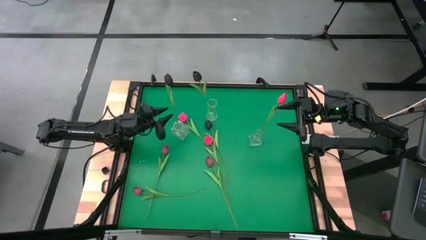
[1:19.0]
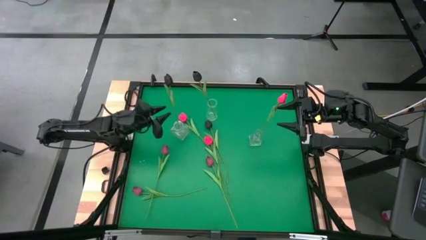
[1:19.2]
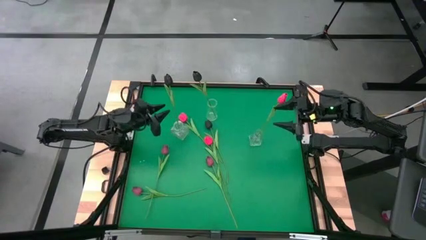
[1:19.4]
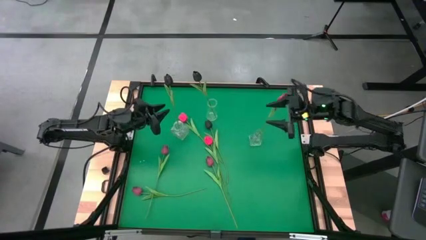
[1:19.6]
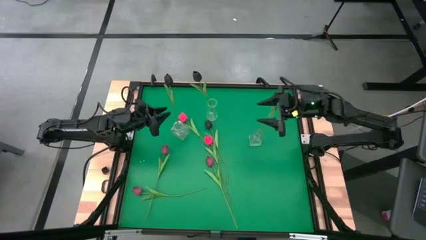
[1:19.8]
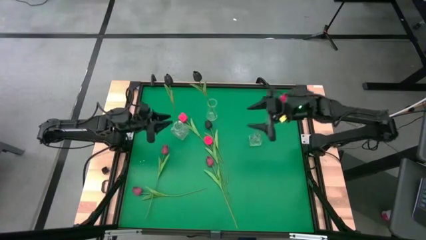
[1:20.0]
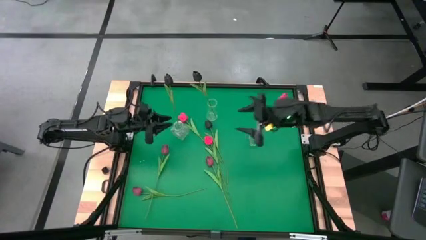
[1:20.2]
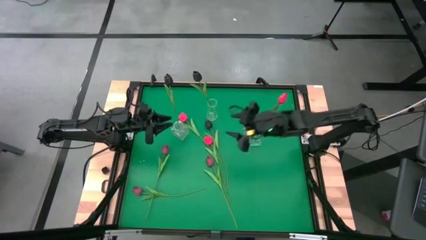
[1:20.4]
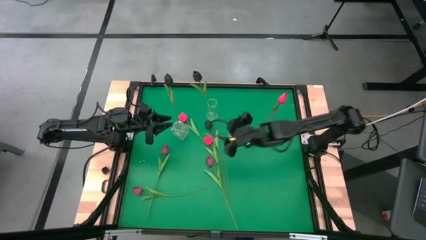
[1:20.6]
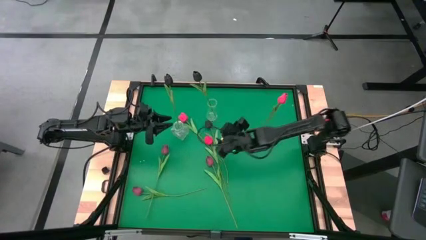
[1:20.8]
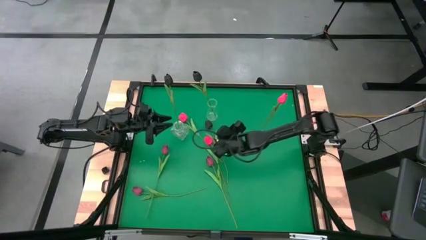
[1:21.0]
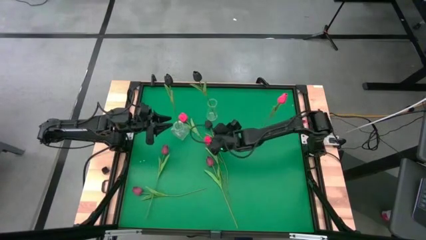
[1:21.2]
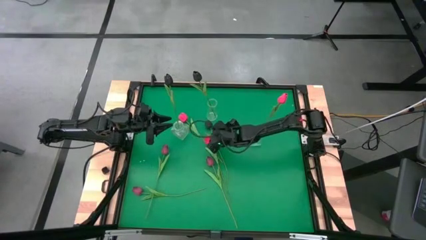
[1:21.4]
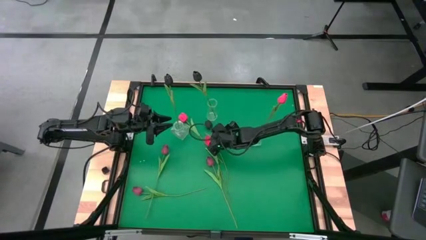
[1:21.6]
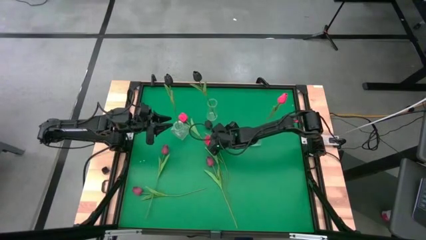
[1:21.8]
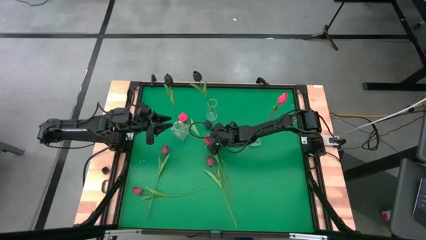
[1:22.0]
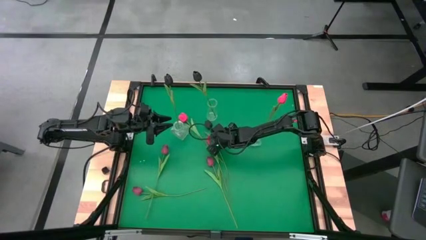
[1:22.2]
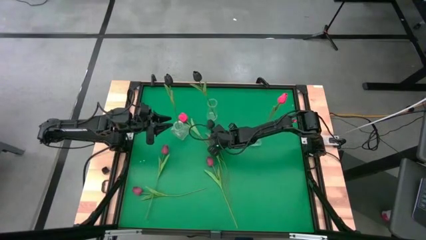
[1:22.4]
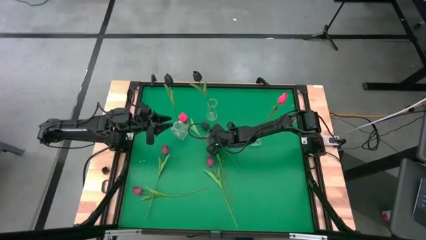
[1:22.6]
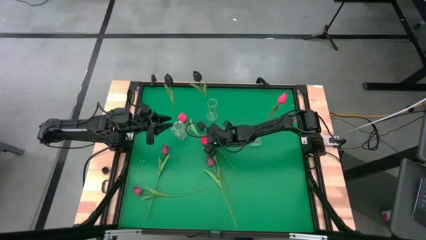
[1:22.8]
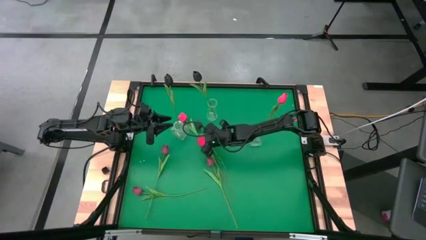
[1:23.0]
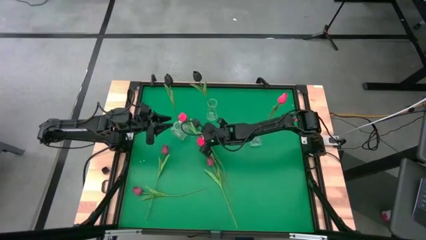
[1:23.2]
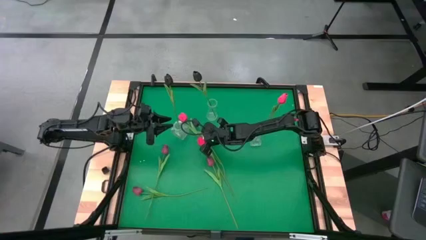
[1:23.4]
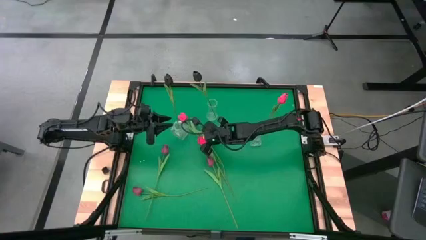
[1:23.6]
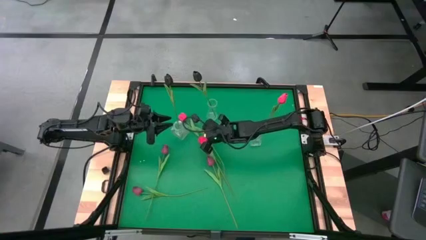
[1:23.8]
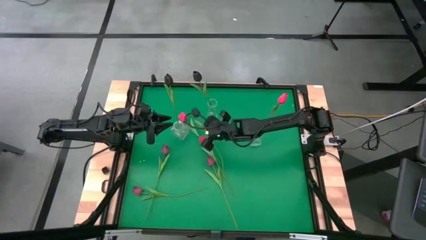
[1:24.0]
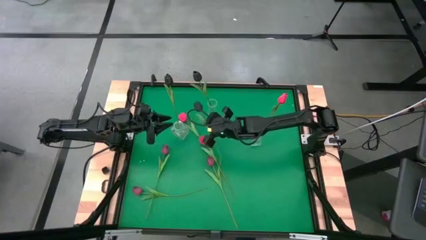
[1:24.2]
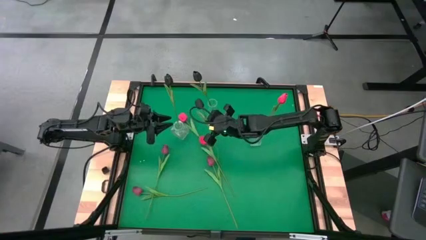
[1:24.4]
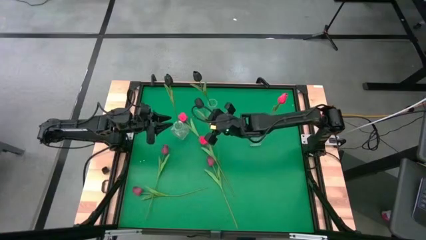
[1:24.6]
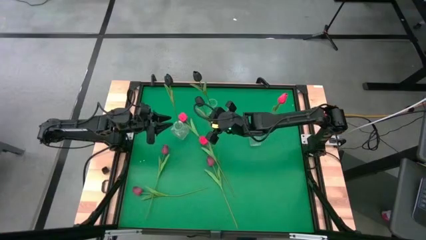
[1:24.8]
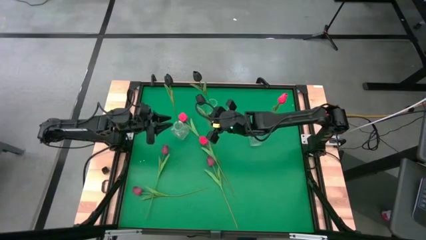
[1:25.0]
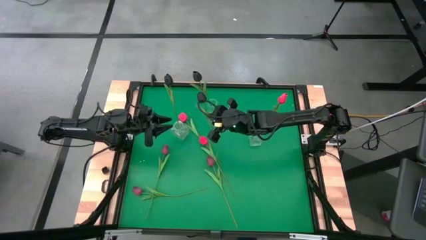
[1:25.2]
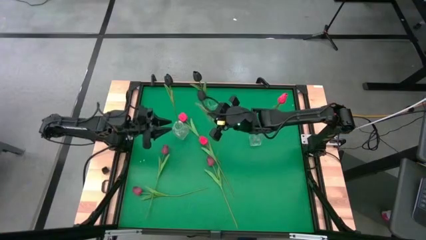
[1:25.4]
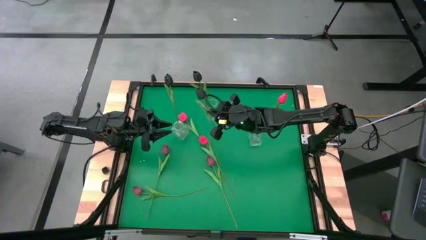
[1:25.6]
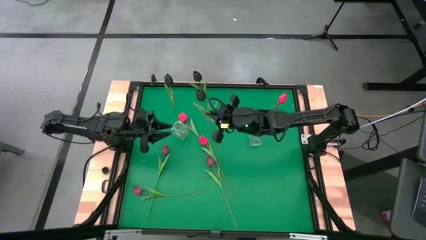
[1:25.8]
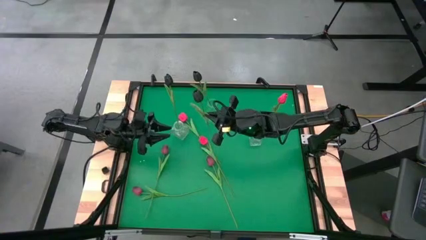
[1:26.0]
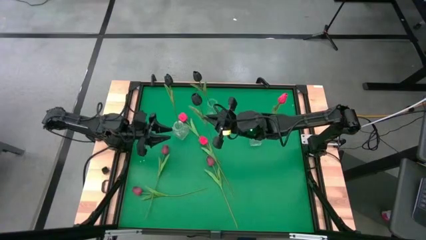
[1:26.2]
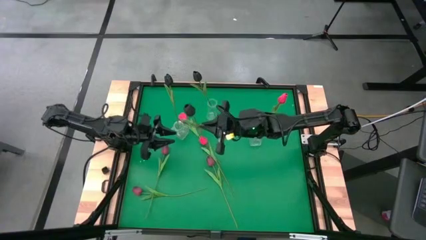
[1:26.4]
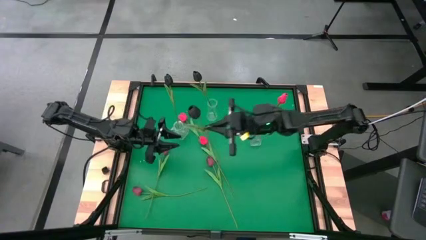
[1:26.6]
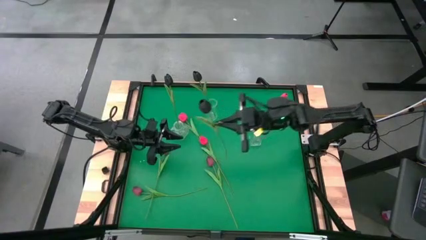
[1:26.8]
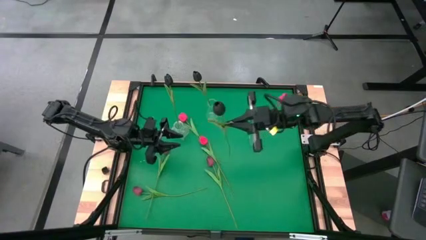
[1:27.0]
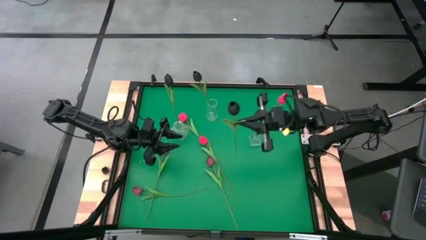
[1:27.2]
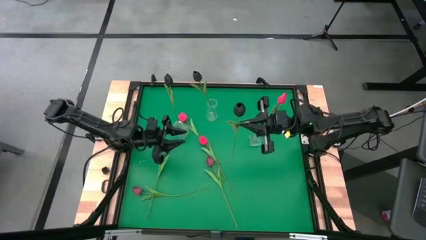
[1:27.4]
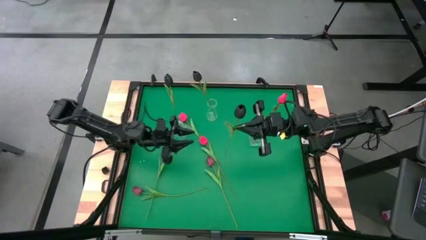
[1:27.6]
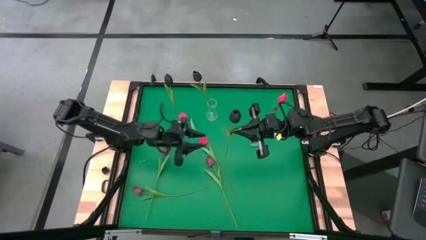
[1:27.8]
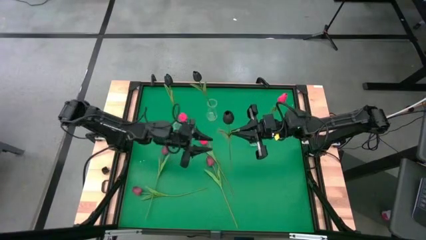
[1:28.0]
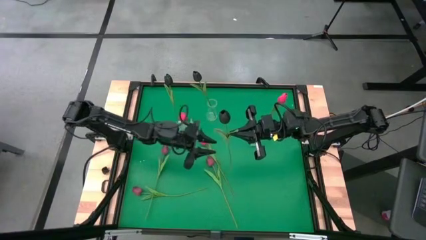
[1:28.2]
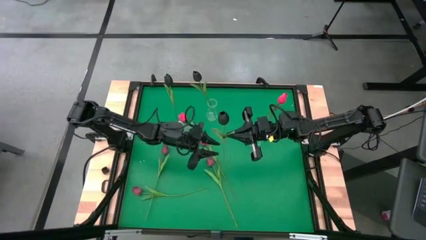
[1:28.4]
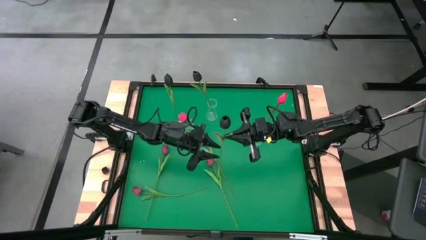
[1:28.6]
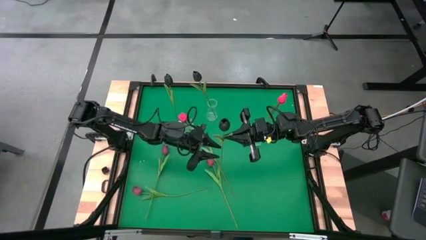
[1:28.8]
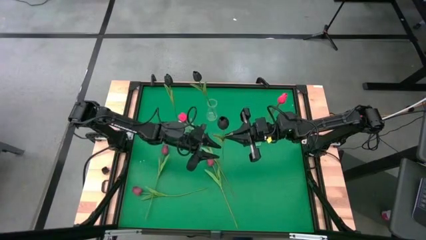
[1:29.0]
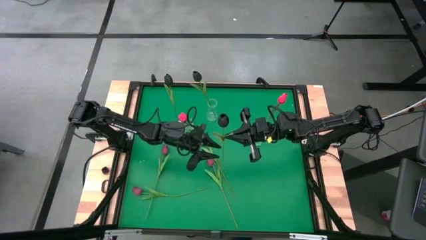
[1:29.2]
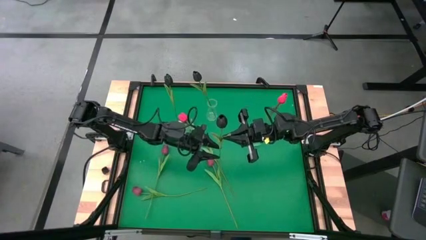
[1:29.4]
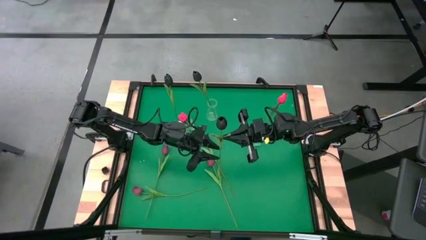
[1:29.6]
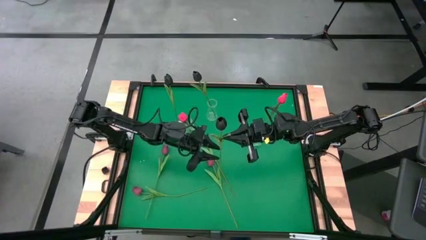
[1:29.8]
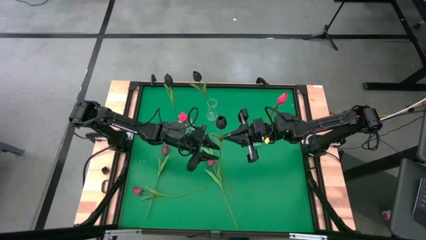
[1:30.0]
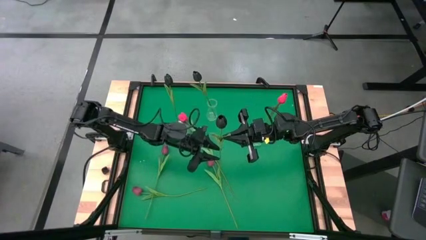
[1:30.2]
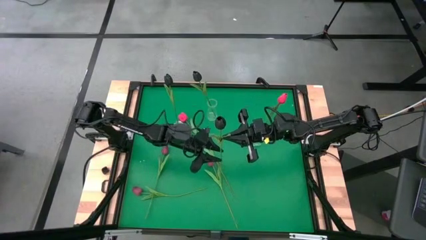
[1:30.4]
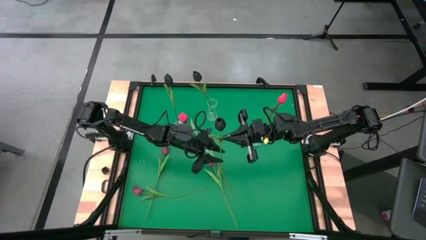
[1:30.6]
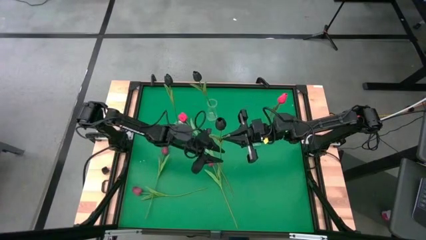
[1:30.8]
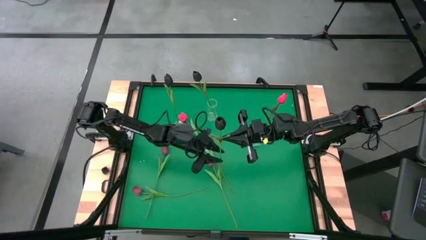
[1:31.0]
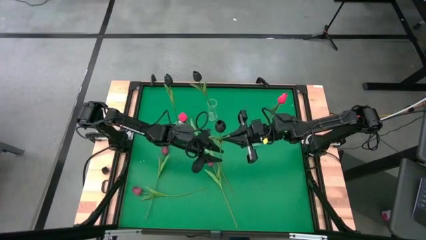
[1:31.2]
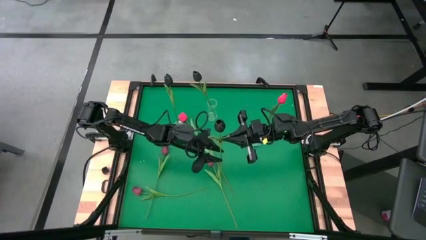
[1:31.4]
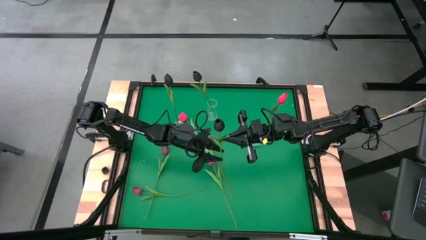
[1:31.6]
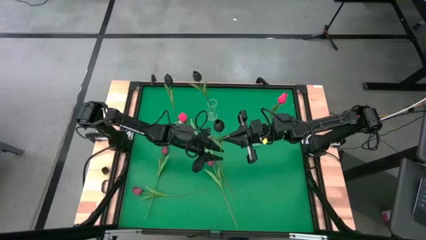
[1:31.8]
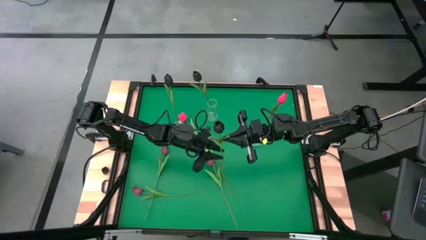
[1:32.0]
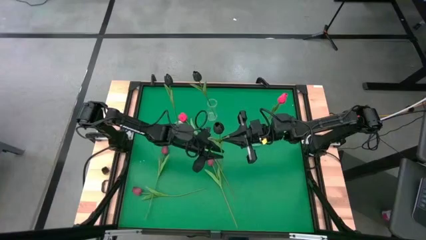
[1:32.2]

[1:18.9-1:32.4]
Task: Sort flowers into vase by color
Put the black tulip into the top transparent vase
